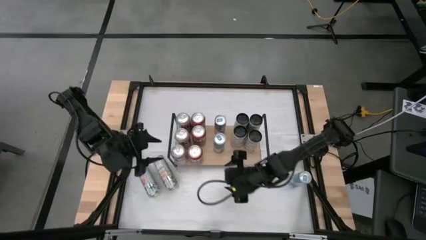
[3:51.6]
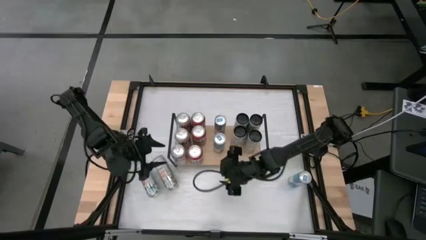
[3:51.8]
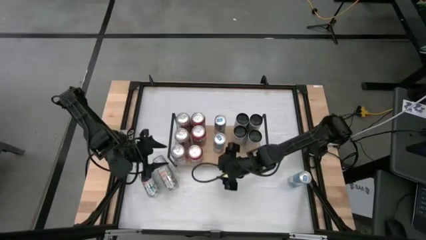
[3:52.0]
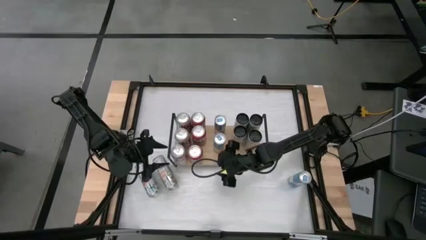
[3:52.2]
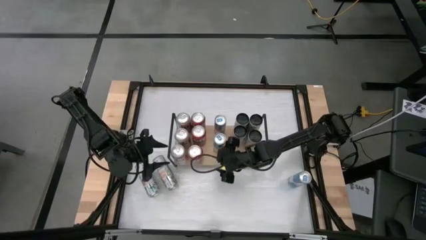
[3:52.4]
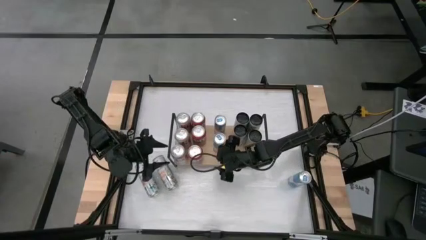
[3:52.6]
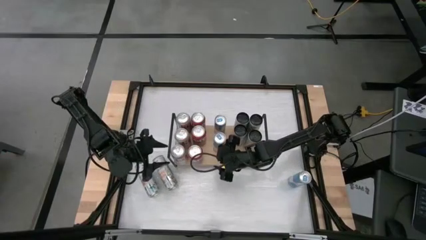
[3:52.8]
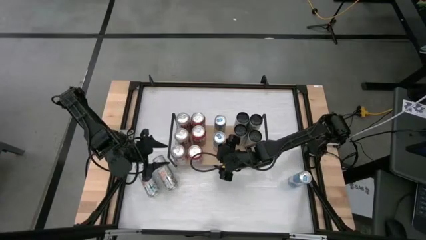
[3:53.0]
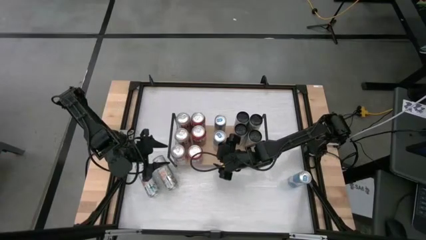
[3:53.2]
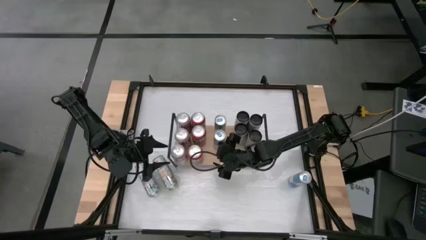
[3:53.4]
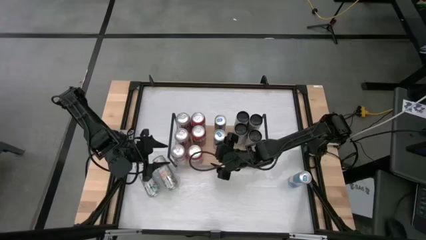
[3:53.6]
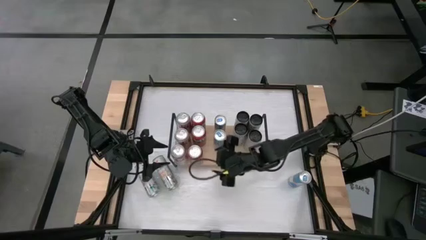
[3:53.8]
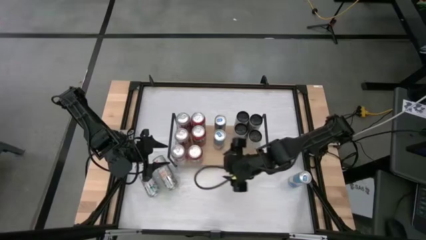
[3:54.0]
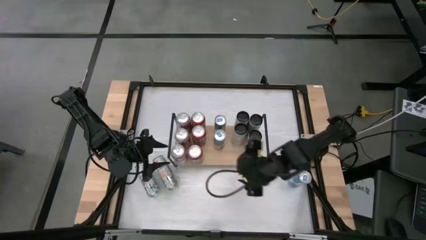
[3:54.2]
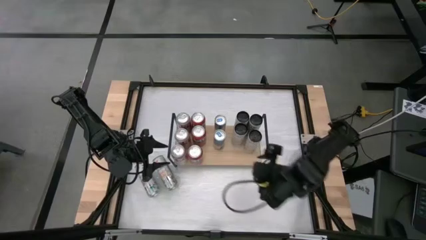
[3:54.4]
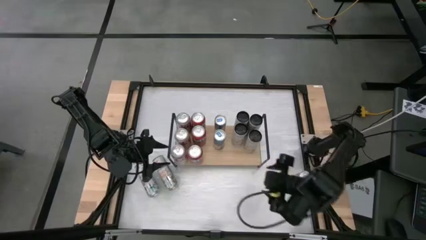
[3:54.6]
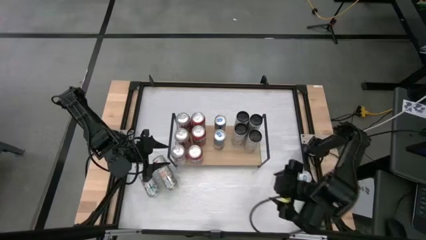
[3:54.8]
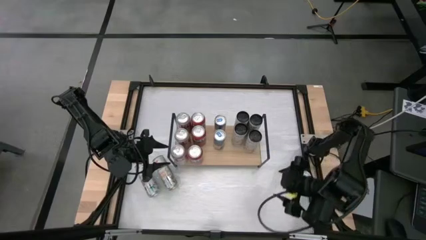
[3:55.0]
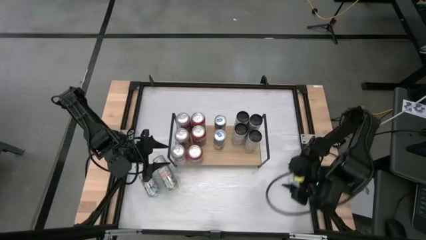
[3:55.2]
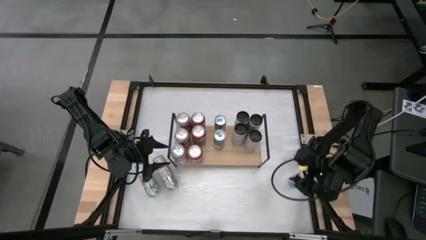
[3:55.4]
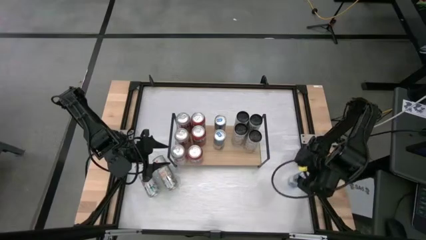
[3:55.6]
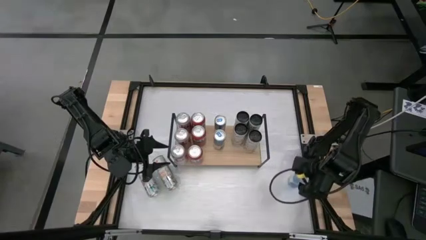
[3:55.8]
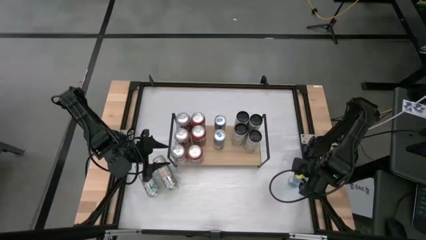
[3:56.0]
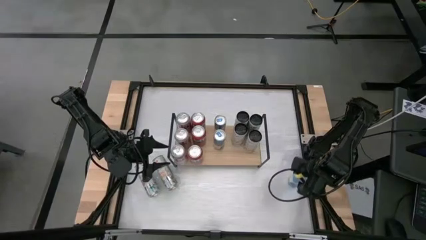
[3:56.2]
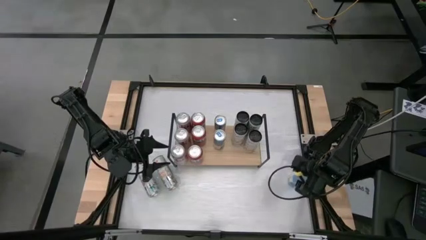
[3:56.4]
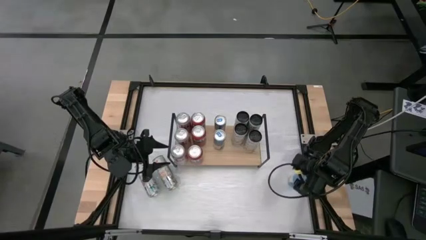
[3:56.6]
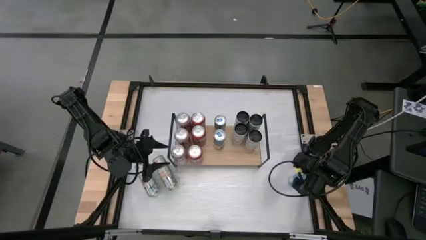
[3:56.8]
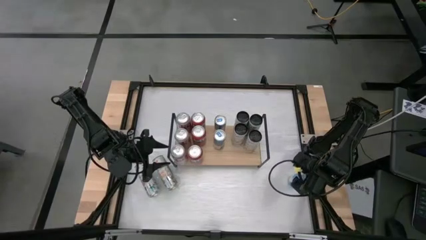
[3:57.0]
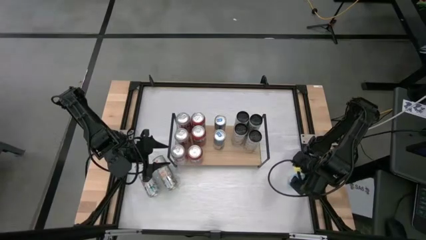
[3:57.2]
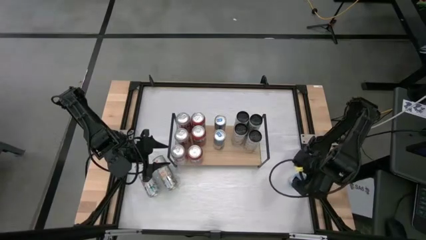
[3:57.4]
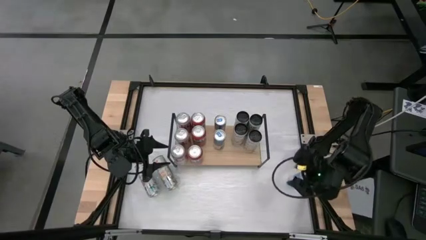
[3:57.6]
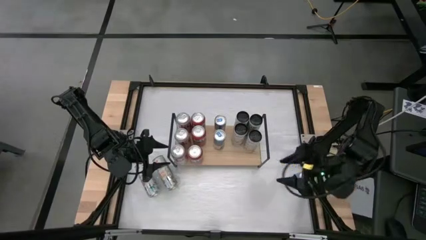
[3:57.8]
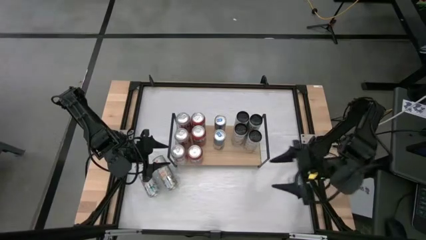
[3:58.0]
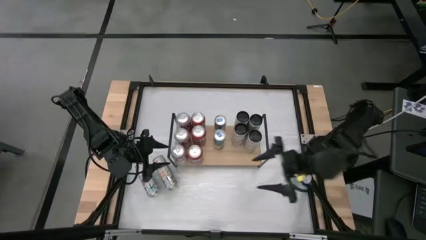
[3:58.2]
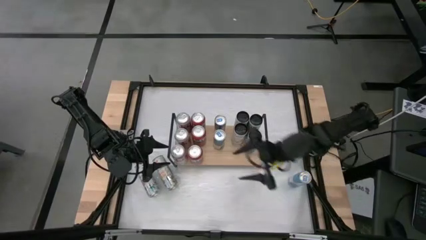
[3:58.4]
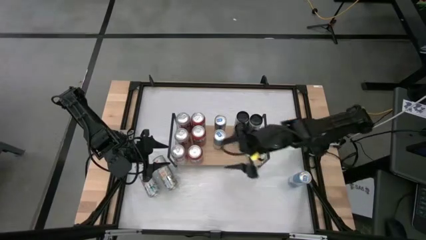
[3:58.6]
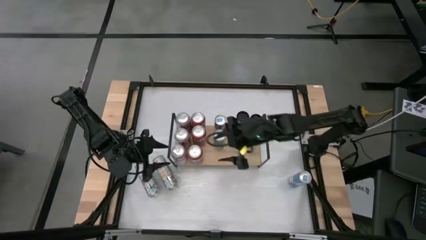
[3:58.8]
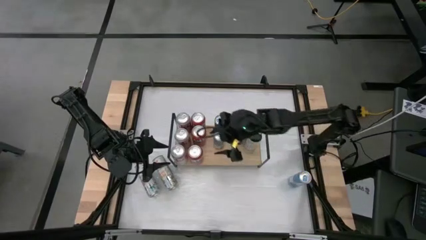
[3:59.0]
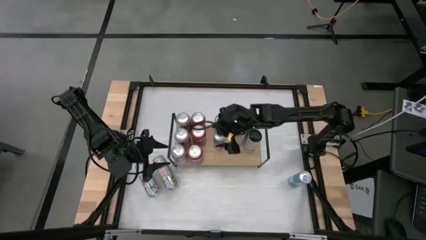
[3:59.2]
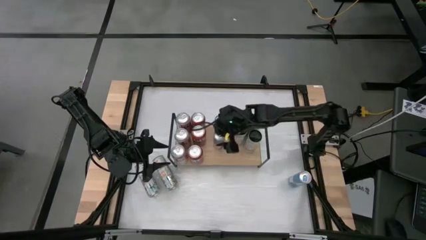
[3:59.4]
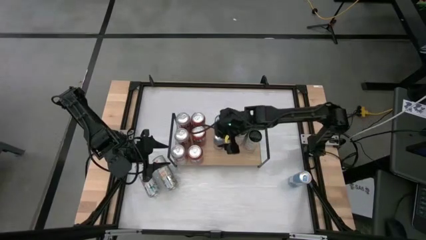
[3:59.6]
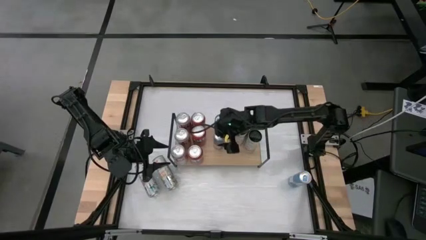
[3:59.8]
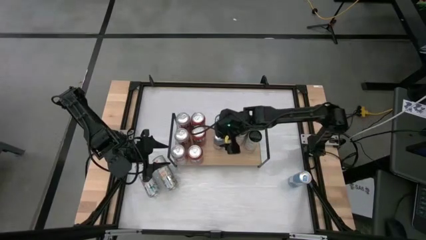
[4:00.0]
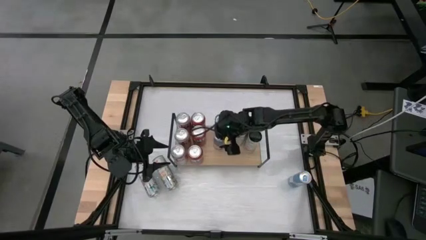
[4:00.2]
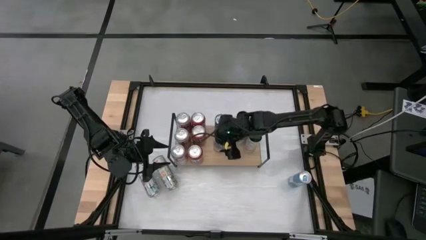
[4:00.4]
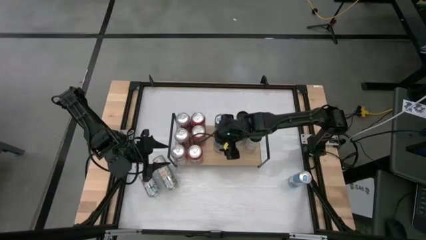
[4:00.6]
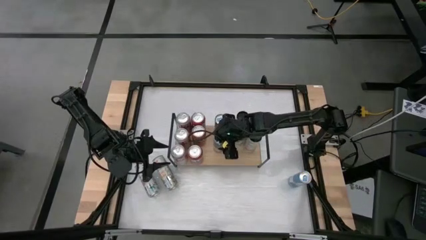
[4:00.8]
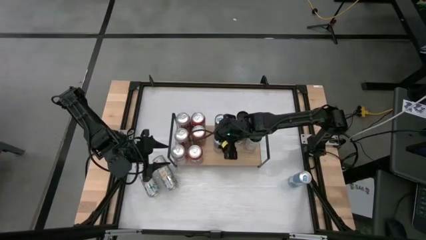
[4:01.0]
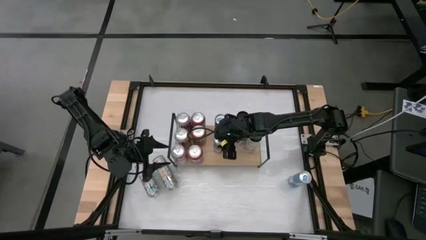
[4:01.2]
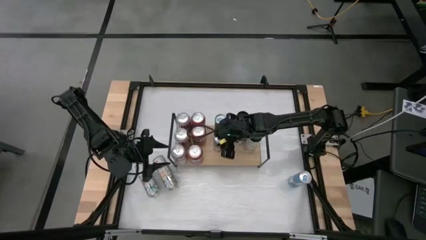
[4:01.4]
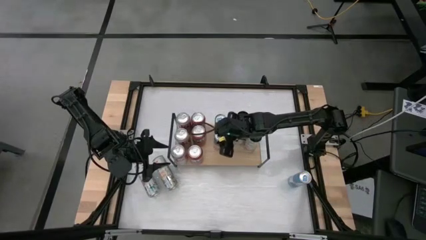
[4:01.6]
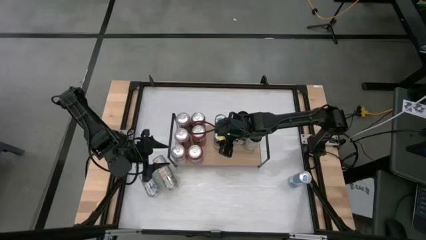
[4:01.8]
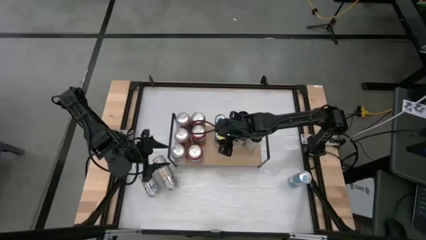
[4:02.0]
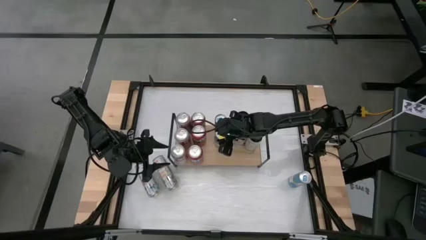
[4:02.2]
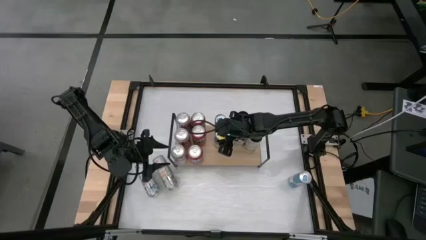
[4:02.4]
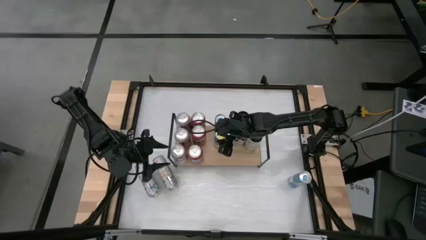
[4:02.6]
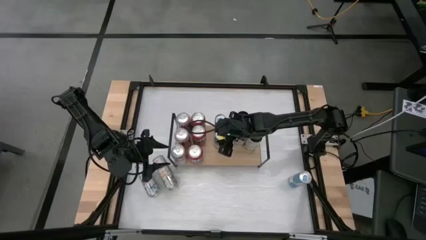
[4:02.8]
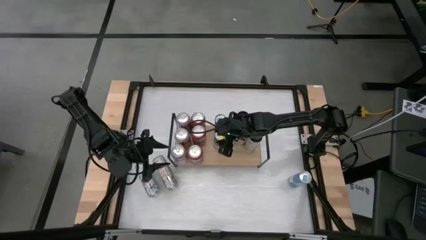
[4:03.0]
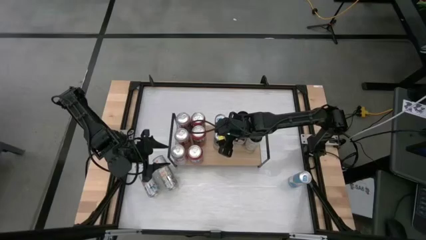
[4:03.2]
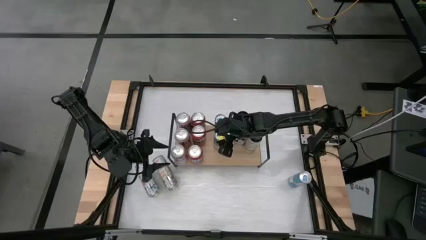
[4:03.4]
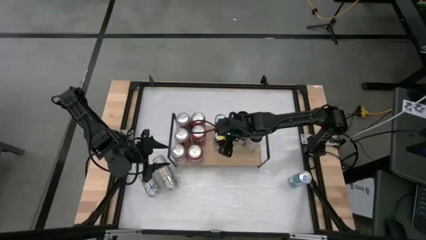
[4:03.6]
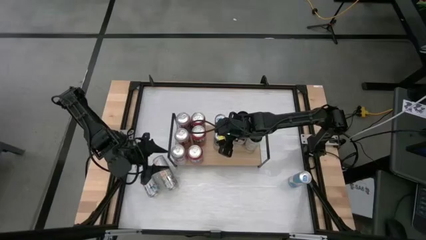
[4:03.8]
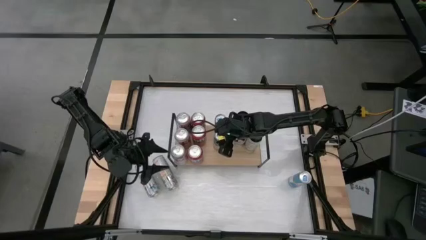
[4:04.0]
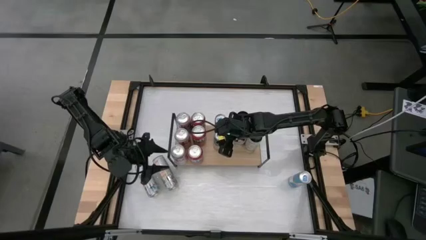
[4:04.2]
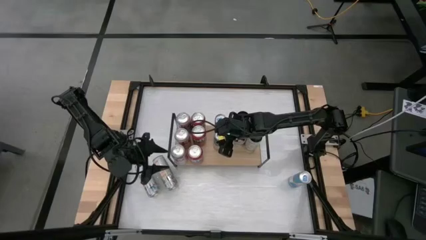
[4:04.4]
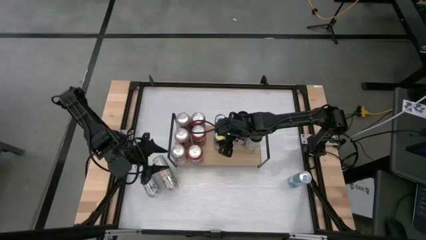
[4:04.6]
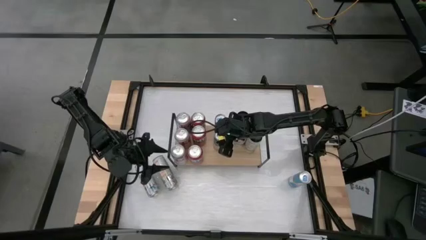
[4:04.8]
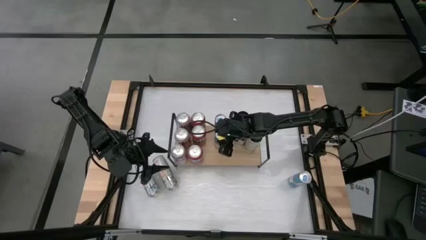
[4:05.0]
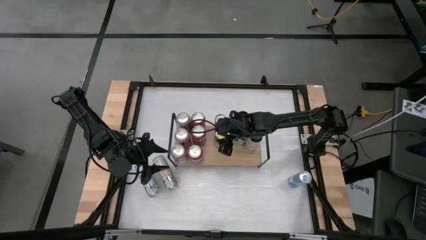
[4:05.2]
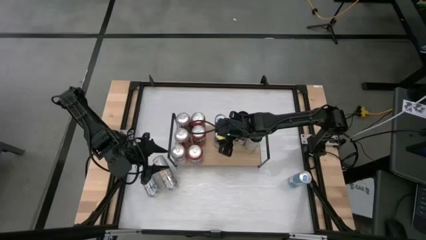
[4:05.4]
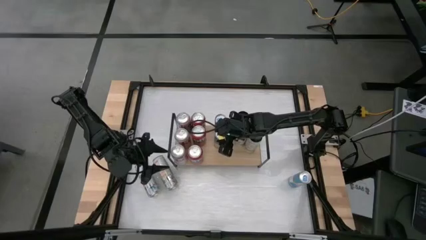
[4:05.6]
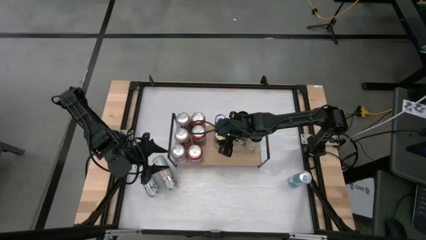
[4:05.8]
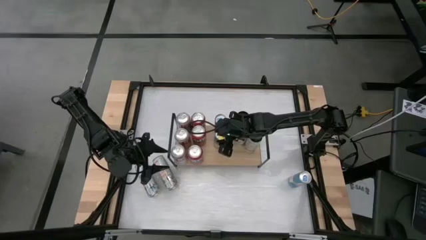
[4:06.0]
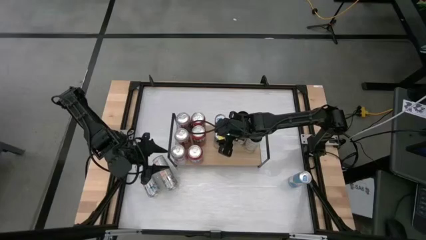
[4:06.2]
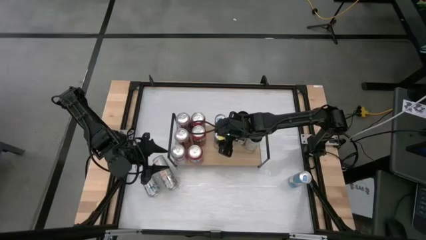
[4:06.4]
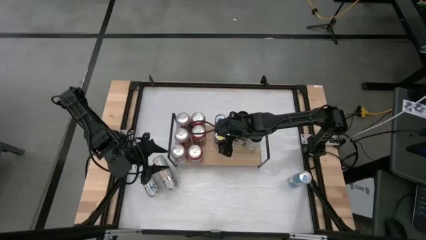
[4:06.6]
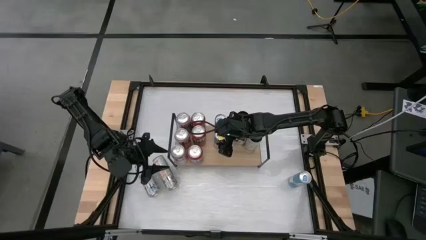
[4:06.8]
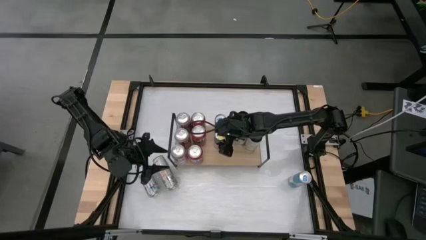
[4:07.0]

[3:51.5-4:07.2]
Task: Place canned beverage on shelf
Put the left blue soda can on the shelf and align with the other soda cans
